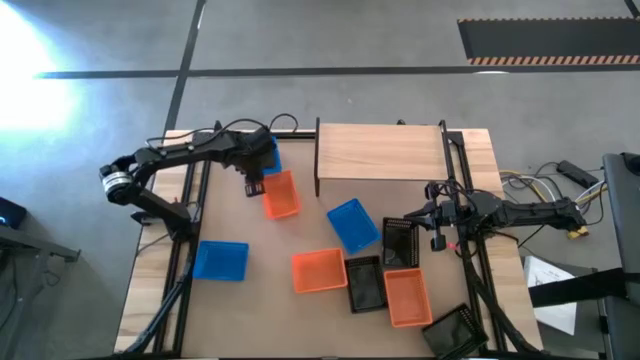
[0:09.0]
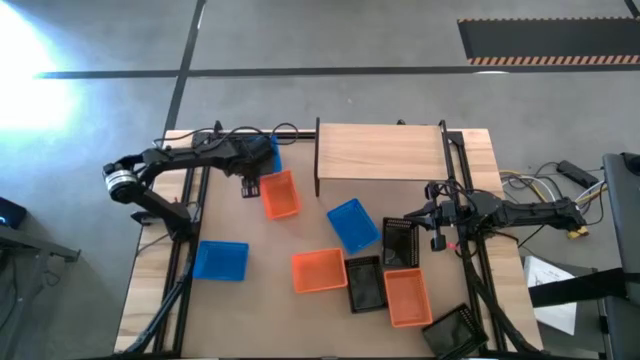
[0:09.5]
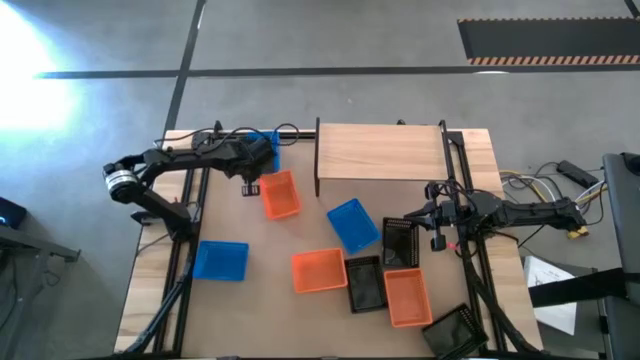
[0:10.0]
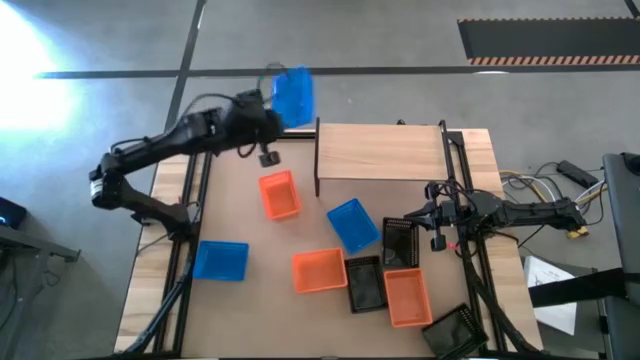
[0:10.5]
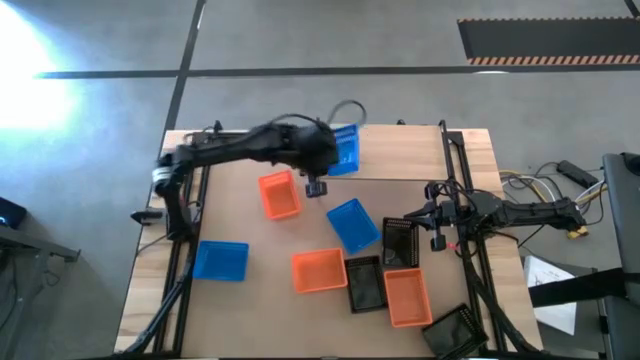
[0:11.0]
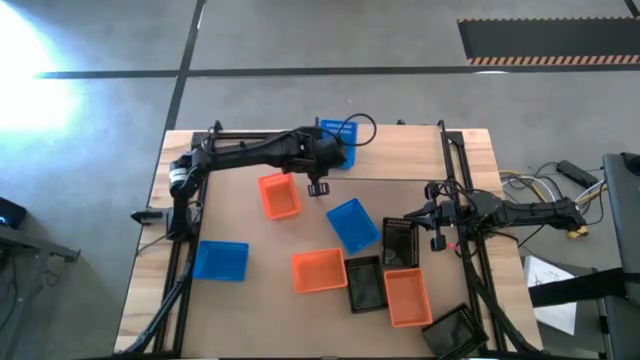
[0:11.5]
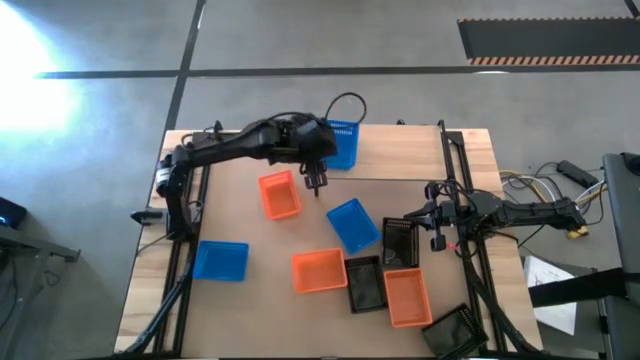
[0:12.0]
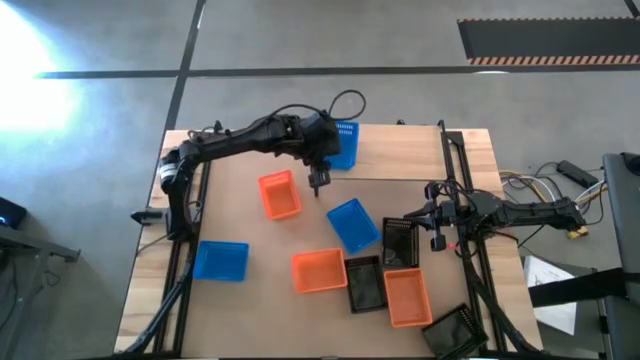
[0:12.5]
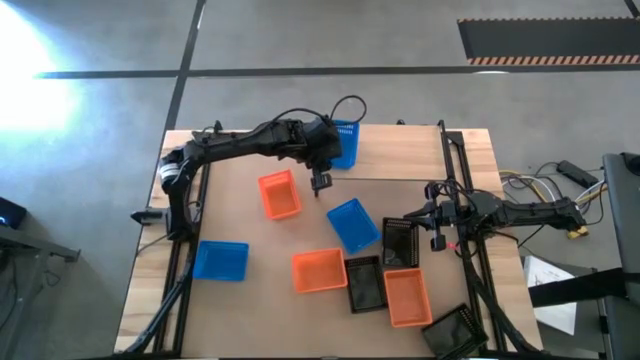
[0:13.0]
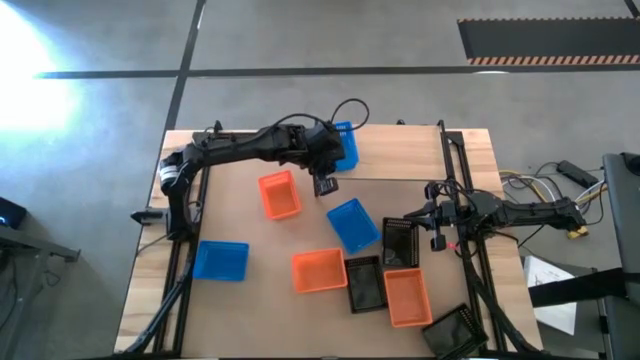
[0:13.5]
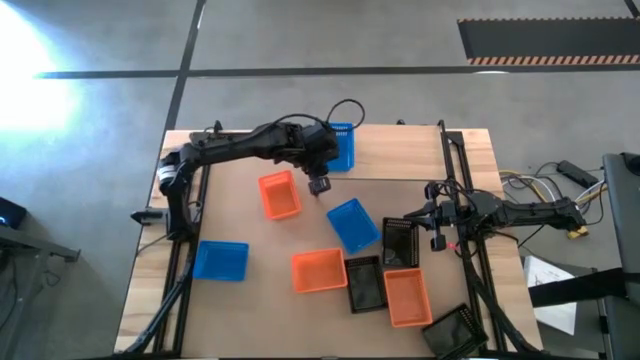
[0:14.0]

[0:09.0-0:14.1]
Task: Stack baskets on shelf by color
Put the top blue bin on the shelf

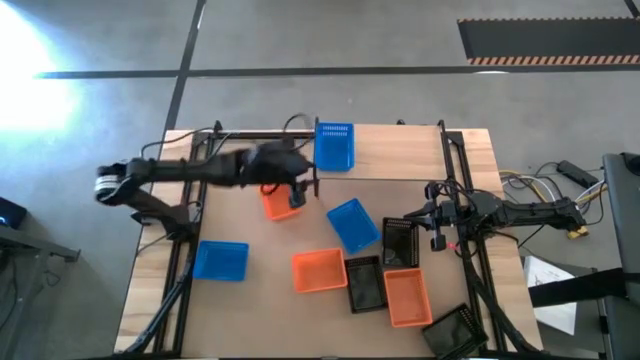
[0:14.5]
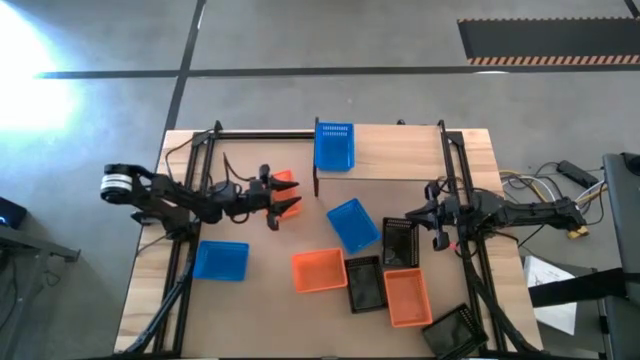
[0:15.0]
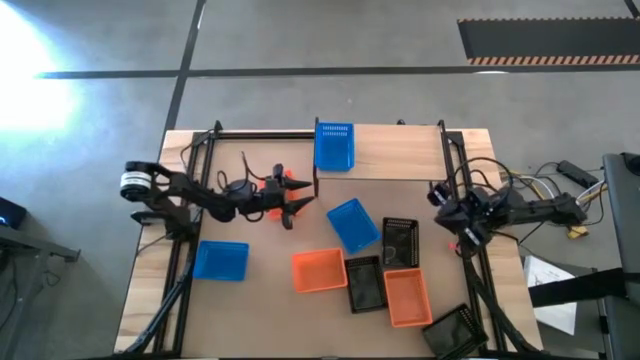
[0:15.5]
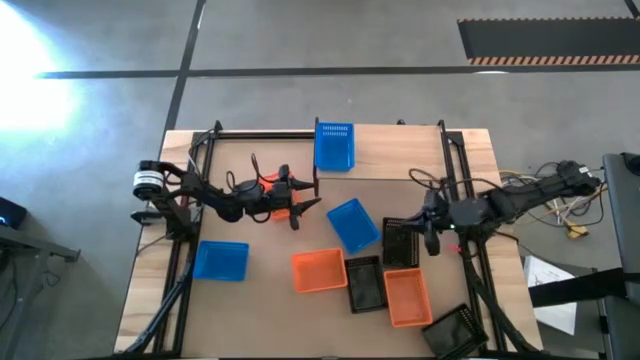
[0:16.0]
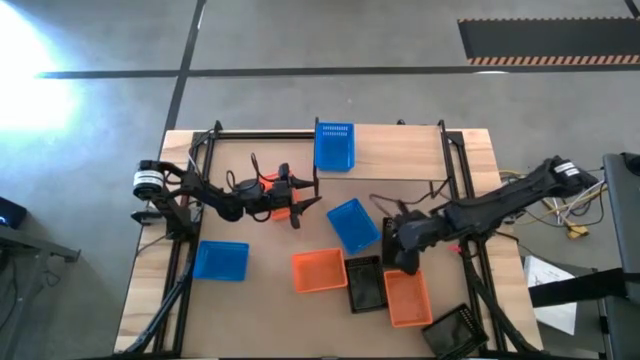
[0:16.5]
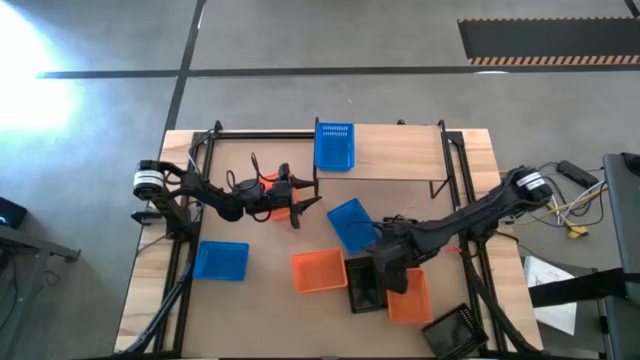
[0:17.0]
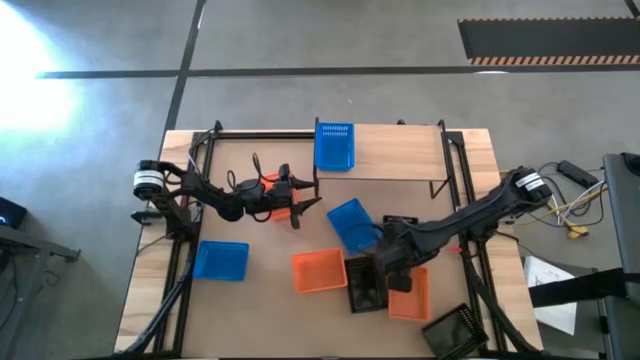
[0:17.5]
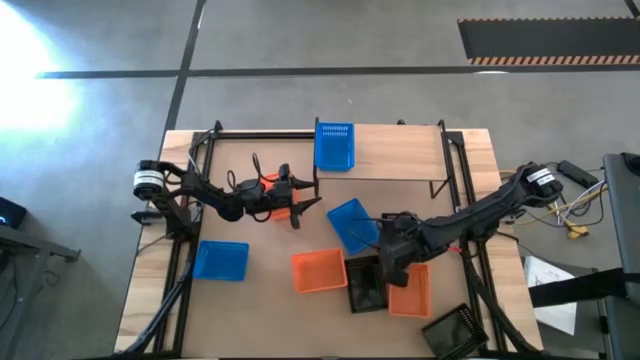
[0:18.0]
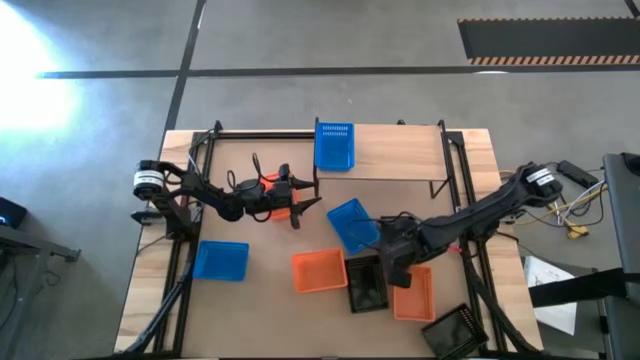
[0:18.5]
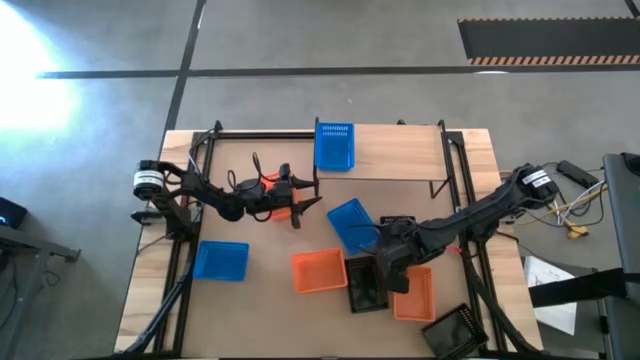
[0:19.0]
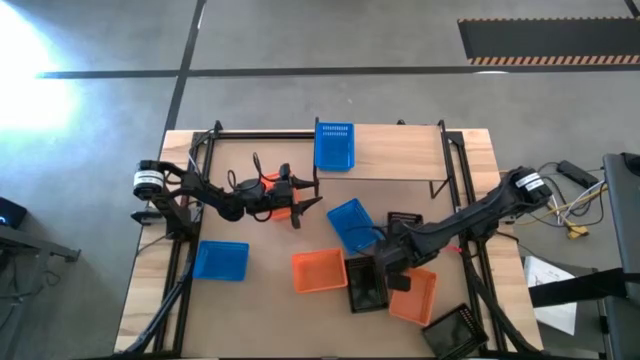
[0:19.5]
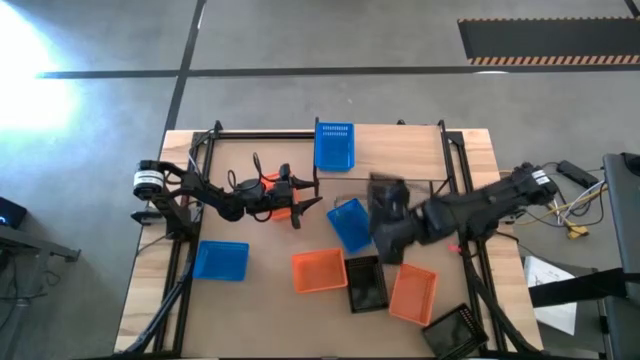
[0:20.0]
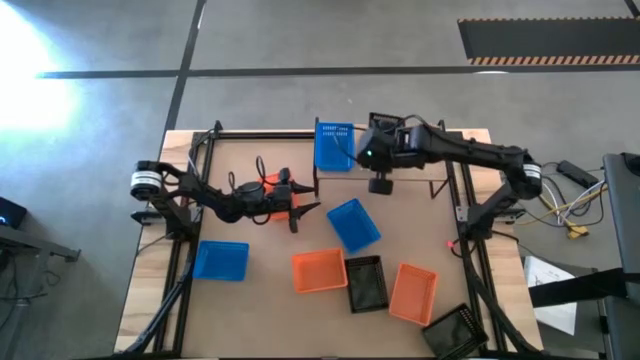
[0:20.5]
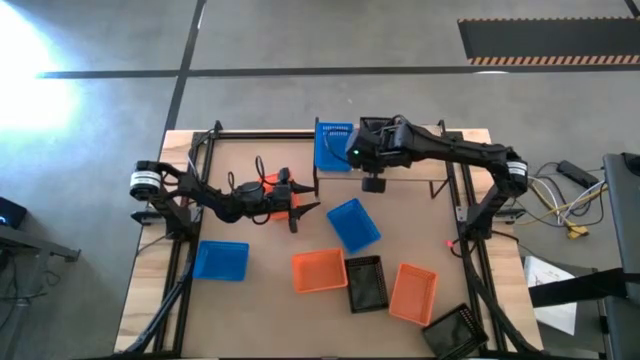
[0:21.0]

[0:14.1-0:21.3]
Put the top black bin on the shelf

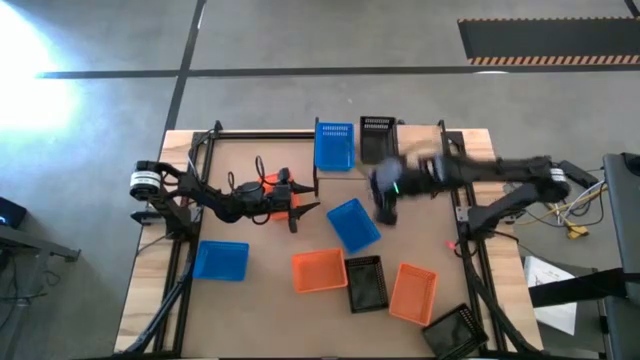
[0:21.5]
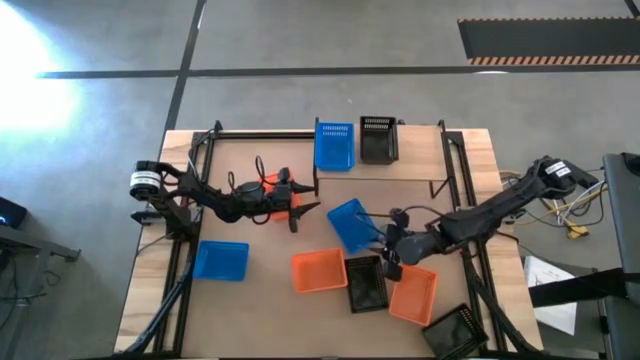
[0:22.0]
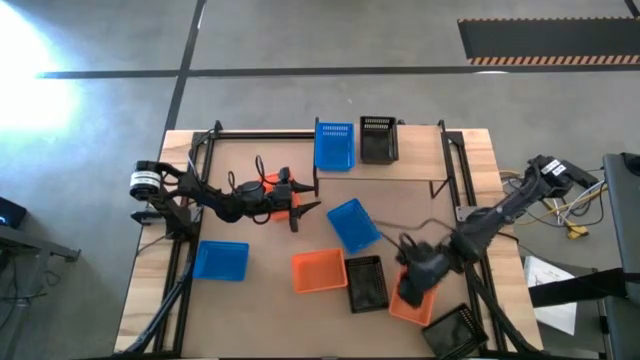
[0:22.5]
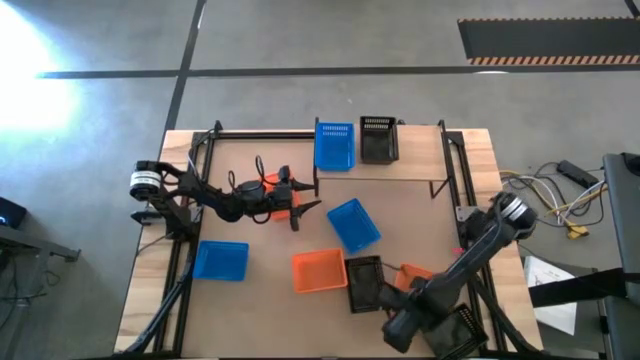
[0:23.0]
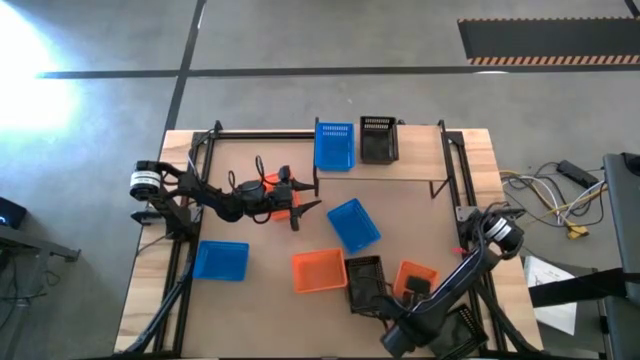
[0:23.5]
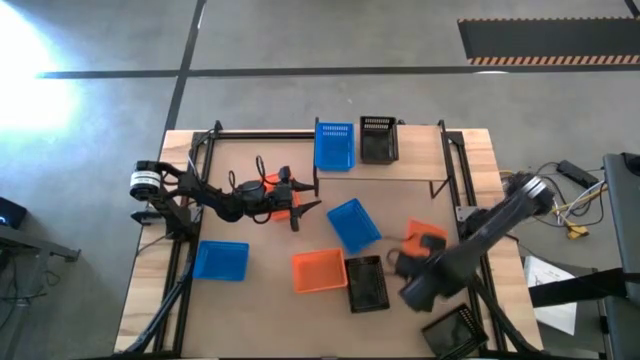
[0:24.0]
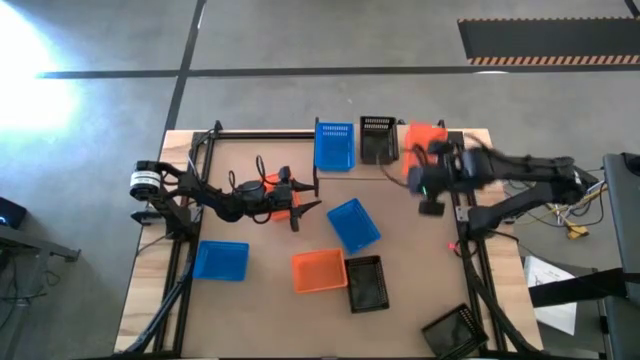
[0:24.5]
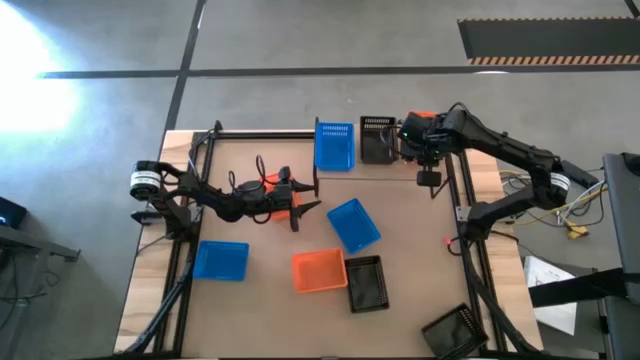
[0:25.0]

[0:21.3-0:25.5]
Put the bottom orange bin on the shelf

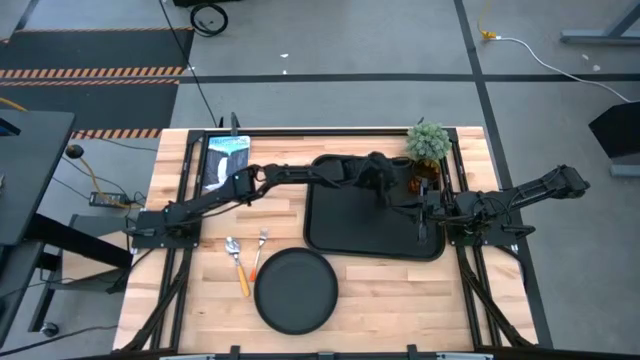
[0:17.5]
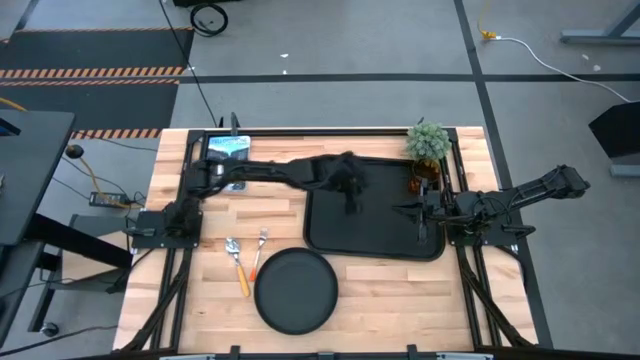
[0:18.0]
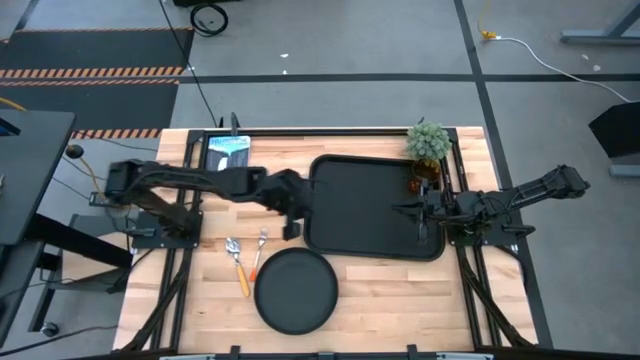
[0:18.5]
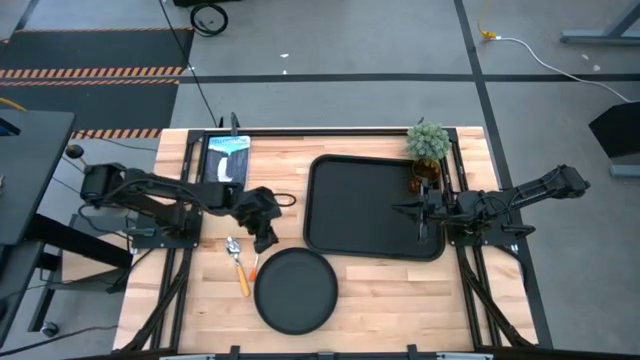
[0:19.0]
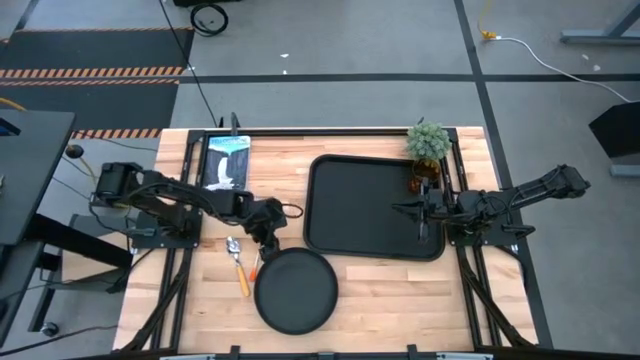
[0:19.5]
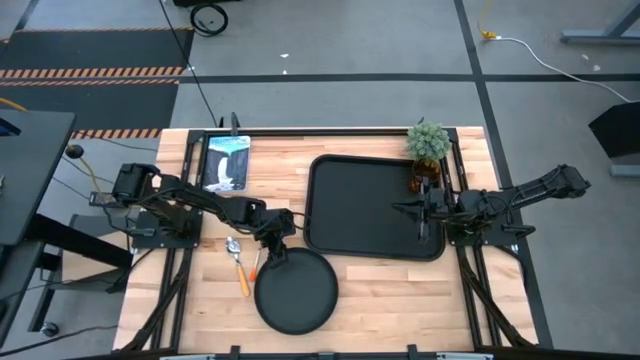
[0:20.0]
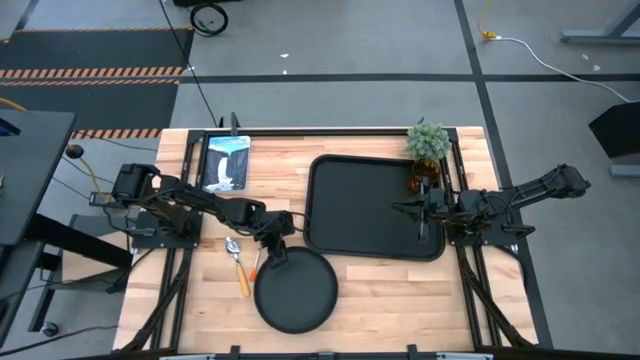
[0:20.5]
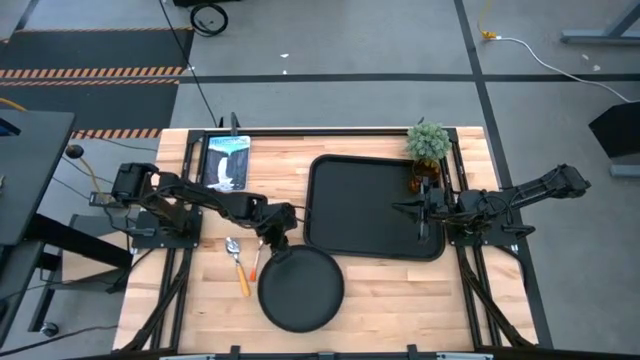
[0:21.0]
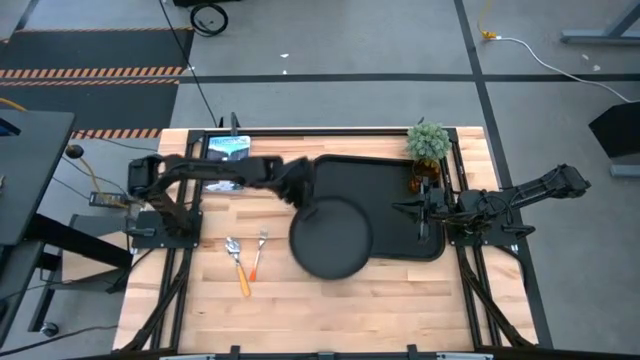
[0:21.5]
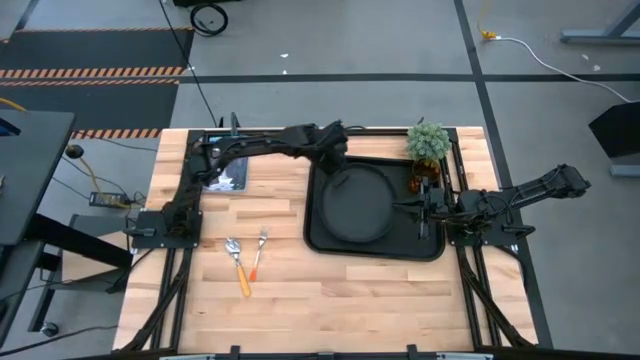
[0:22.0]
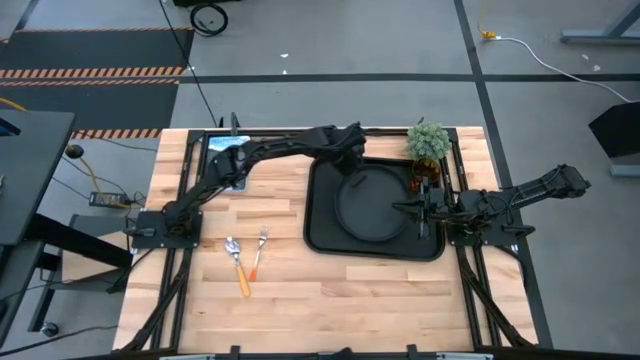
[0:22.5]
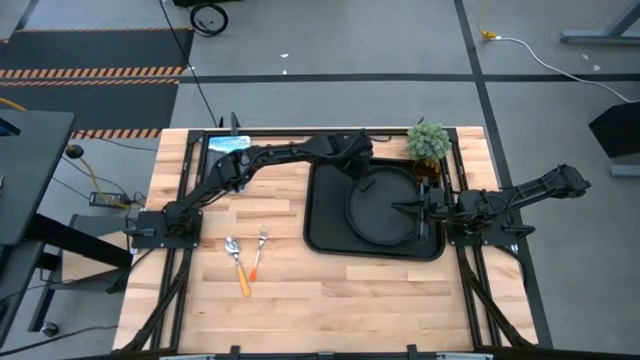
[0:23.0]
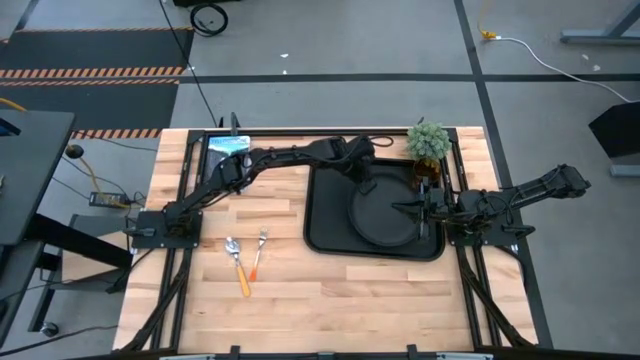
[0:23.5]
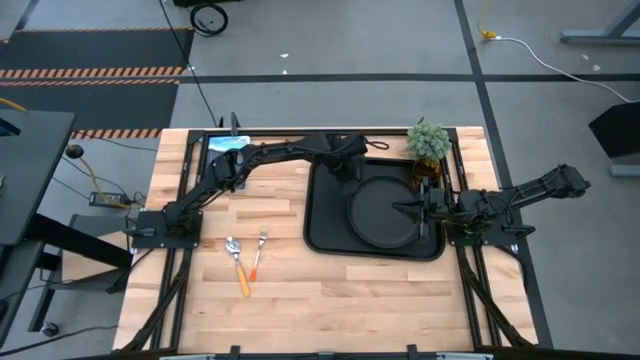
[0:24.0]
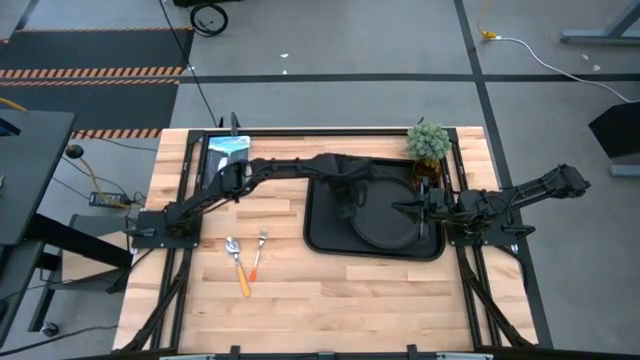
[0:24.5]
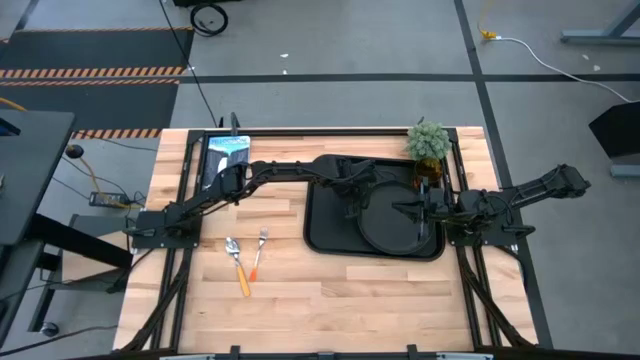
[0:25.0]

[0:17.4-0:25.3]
Task: Pick and place plate/cup/fork/spoon on tray
Put the black plate on the black serving tray to the bottom left of the brown cup
